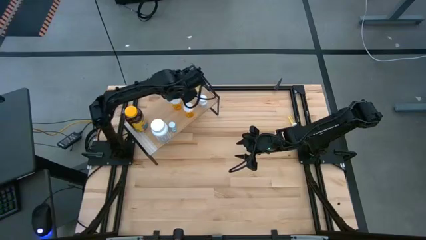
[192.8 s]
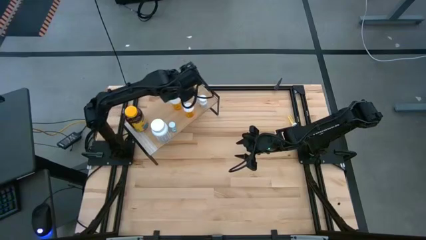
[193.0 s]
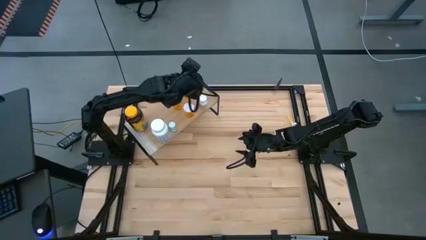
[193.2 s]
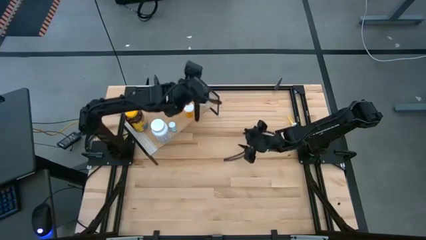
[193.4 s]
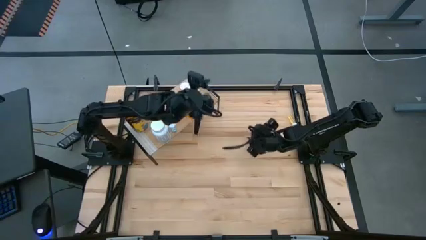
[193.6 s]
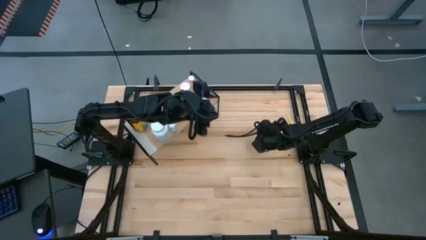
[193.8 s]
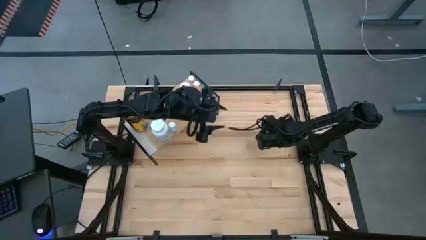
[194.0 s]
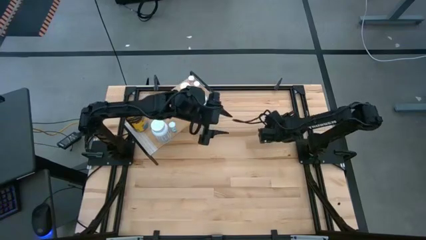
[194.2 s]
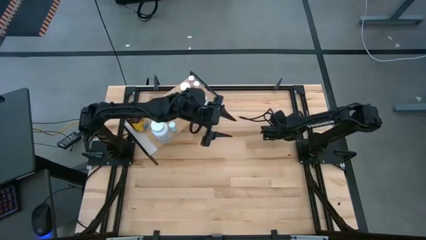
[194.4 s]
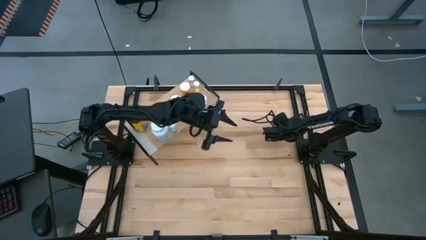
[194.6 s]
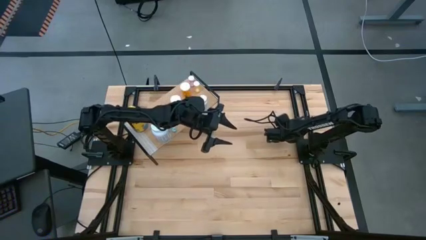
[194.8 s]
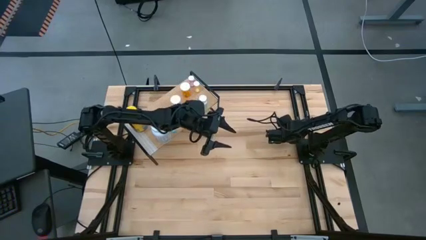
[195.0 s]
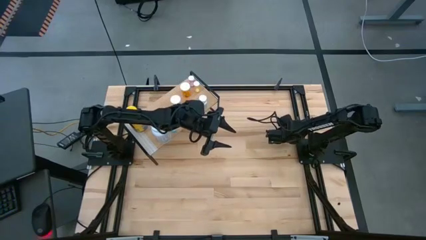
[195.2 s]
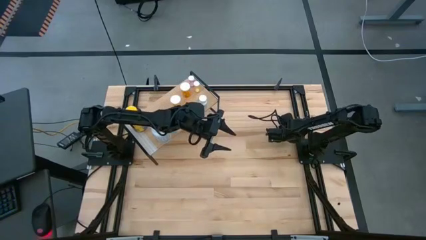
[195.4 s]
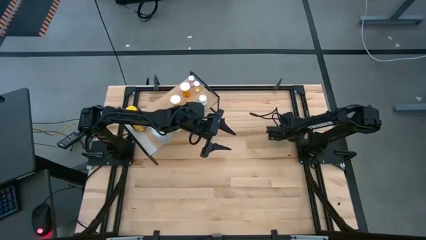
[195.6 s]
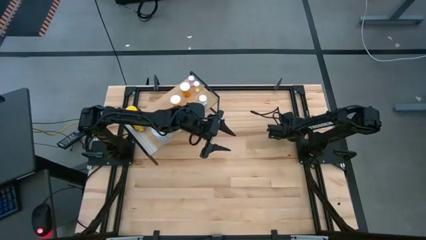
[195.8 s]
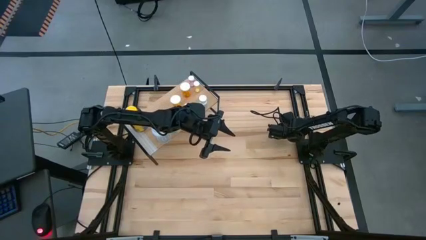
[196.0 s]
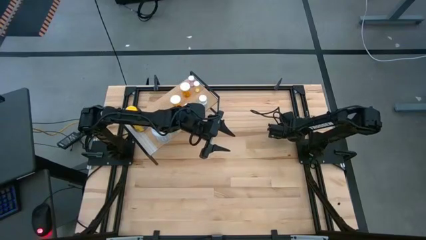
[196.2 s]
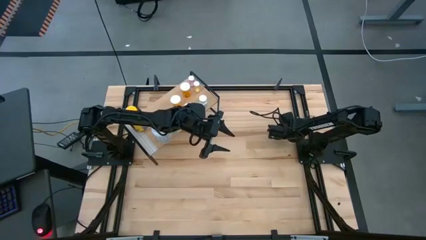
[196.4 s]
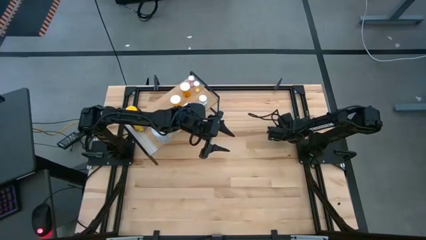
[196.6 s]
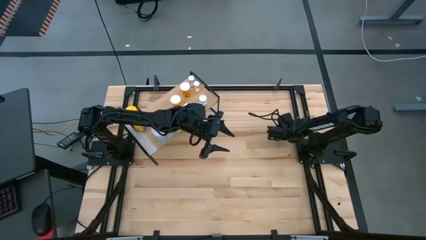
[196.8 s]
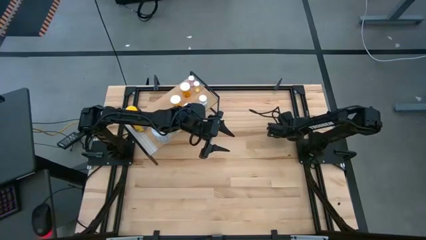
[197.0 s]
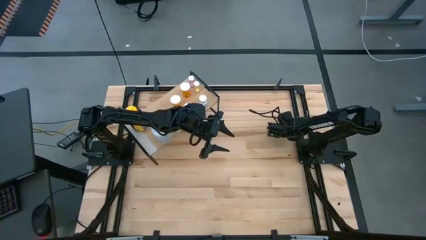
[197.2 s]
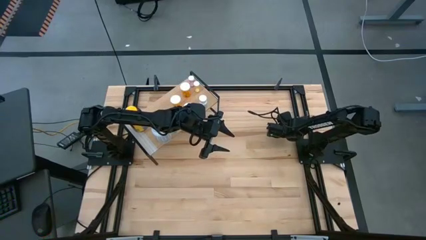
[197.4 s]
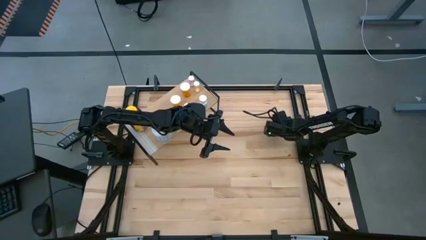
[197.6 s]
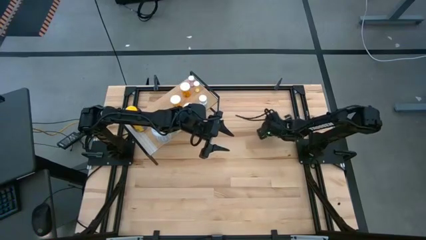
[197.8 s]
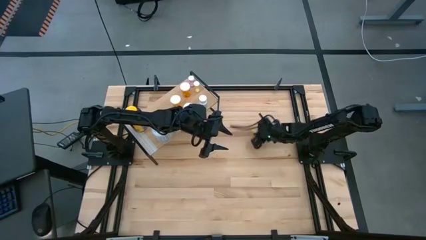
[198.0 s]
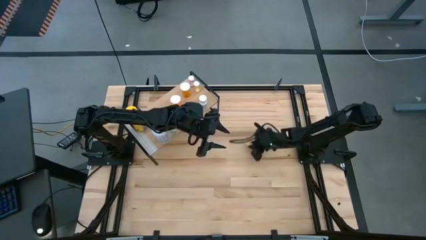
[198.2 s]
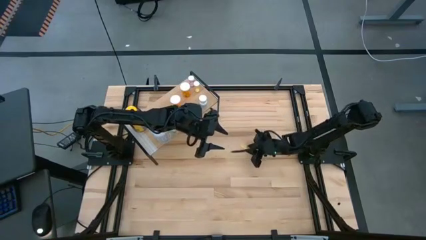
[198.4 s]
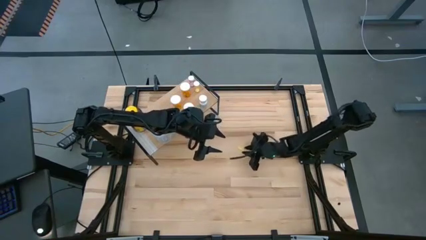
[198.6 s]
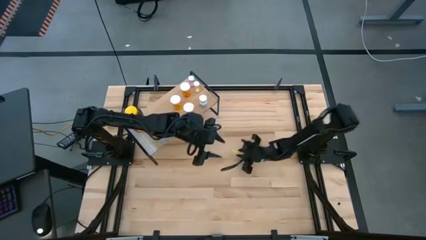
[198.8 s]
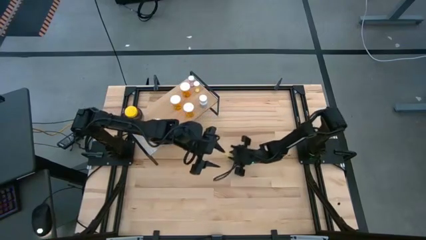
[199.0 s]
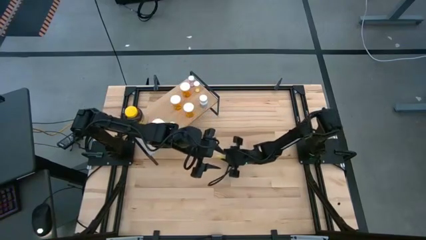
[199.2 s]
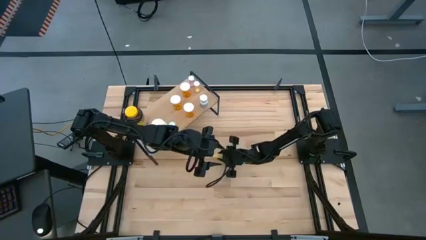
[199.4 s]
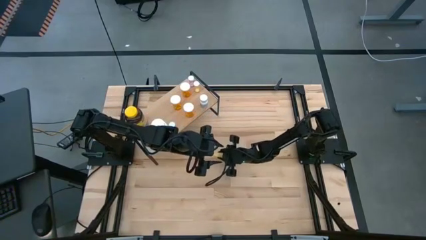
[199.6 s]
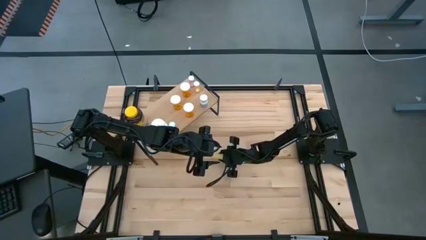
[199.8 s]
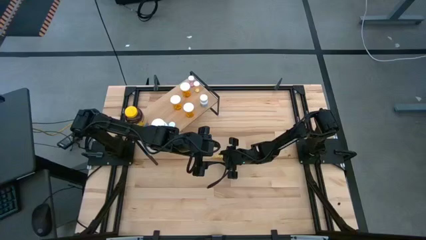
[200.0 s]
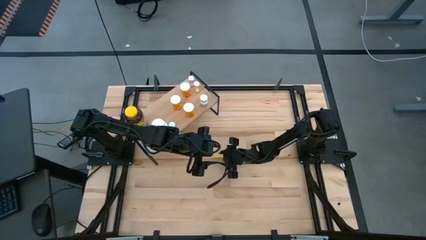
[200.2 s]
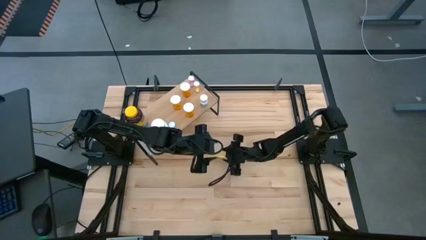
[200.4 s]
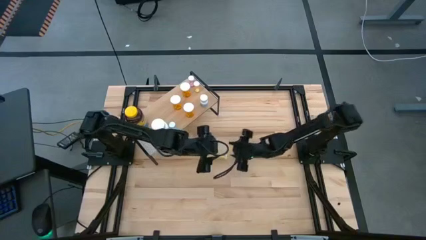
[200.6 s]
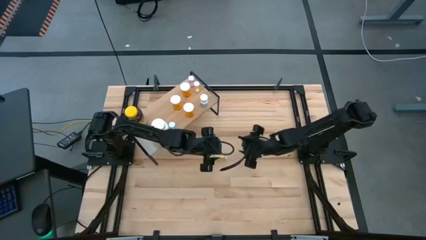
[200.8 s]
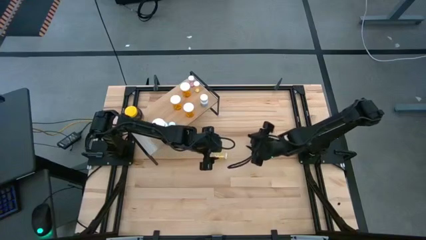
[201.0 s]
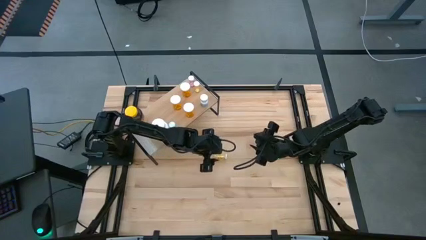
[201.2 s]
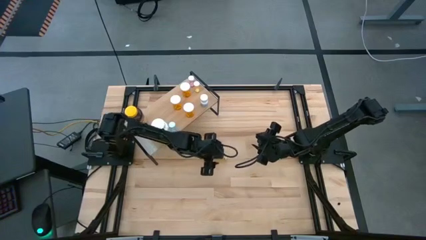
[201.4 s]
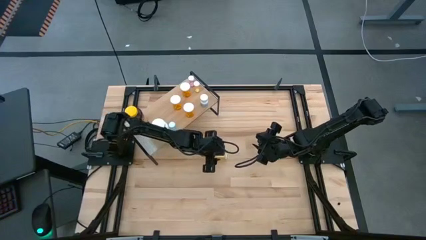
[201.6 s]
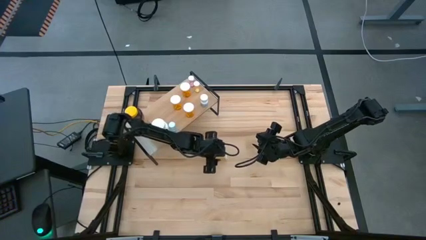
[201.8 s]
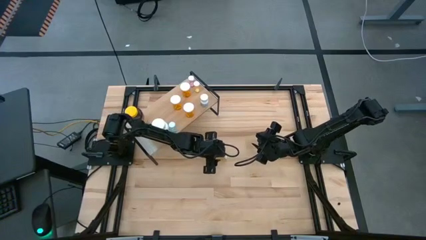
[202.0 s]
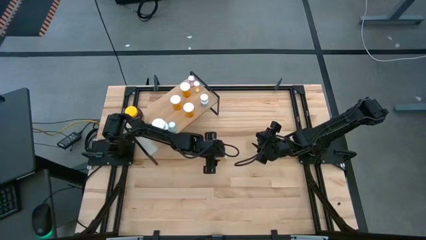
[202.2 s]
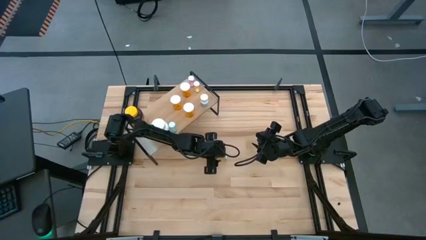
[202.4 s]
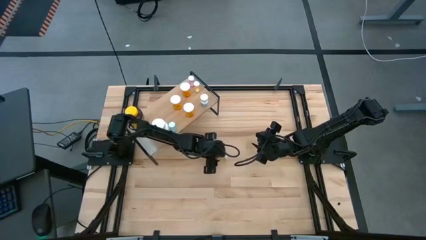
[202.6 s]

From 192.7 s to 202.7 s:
Task: Pick and place medicine bottles onto shelf by color
Put the small yellow pill bottle on the shelf

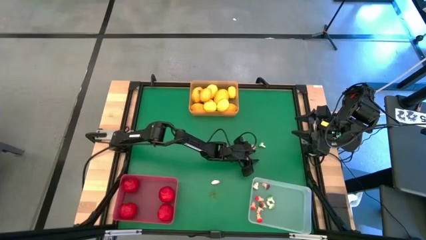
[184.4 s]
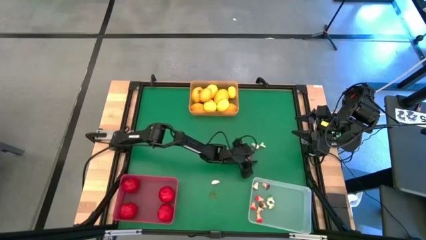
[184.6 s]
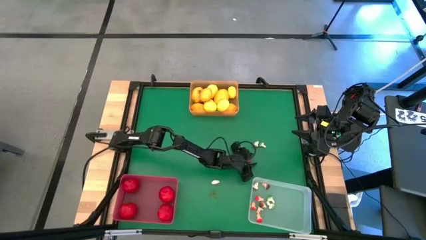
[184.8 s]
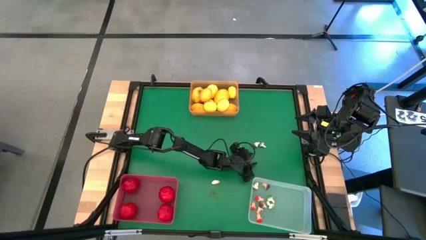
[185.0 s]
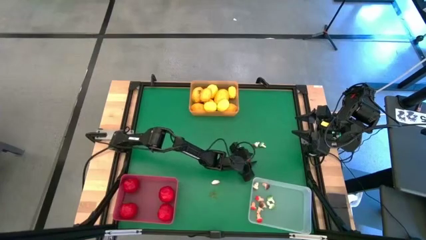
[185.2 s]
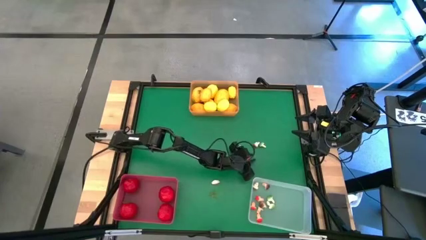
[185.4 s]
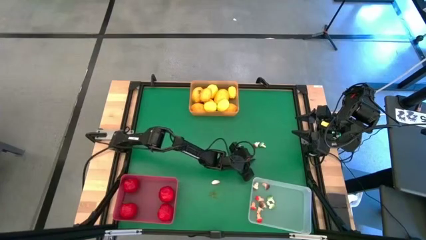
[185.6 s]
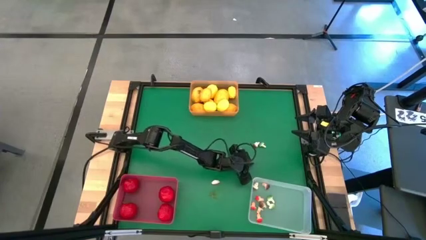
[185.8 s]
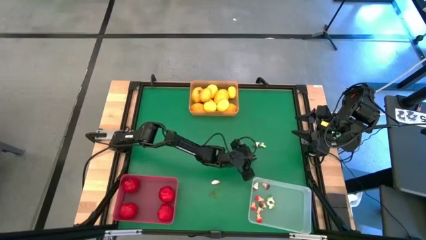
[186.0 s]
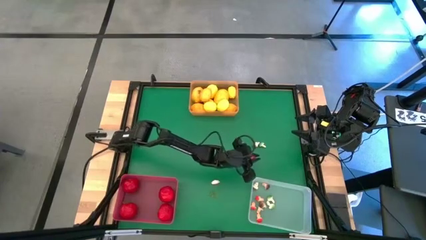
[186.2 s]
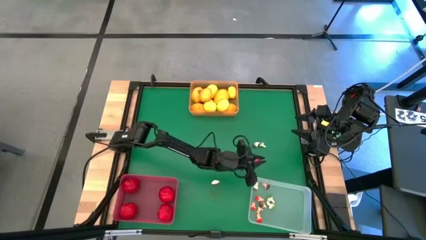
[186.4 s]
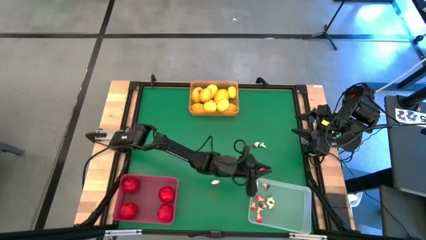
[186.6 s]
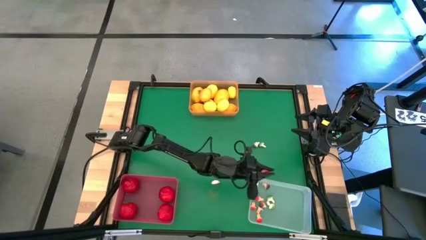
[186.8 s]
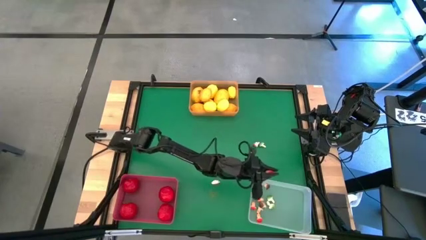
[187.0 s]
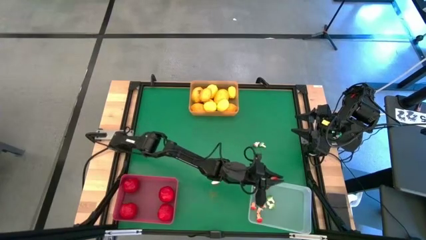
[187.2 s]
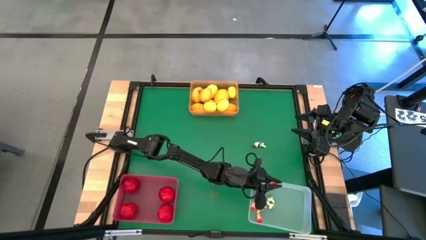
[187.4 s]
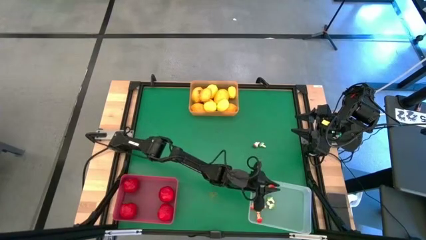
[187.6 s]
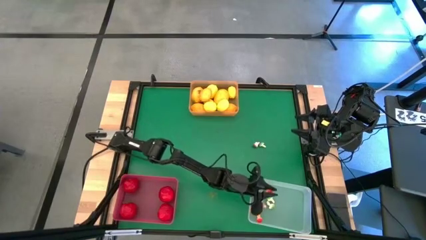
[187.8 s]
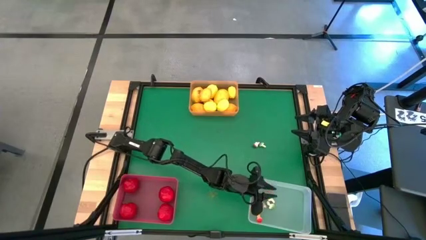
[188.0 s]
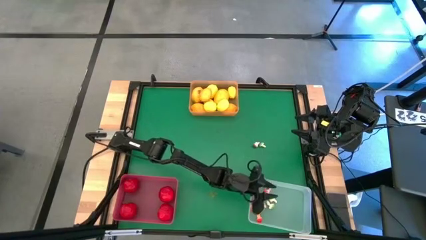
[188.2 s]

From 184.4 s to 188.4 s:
Task: Sort produce into baskets
Put the red mushroom into the transparent bin
